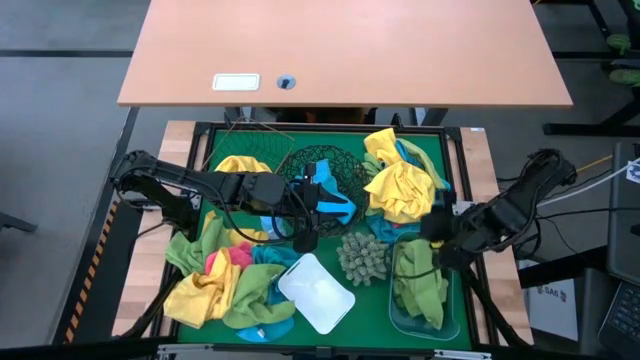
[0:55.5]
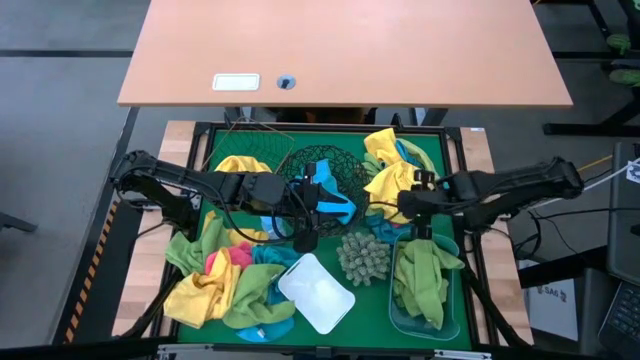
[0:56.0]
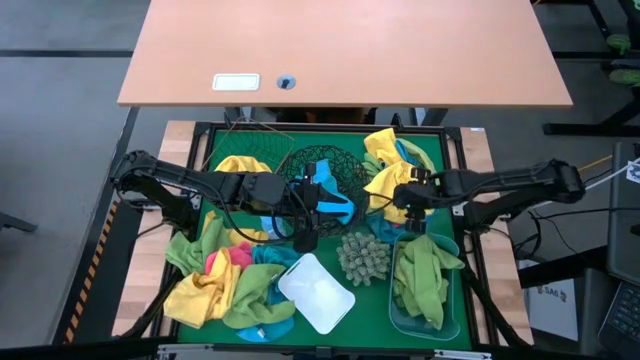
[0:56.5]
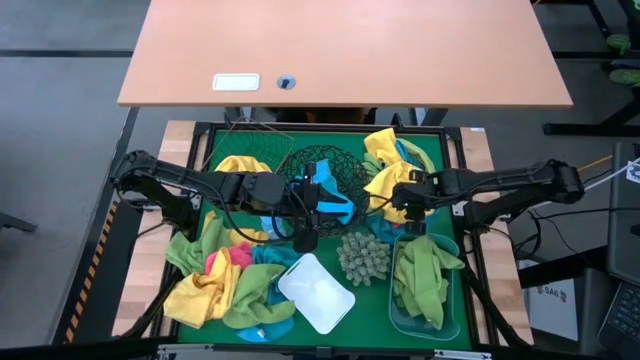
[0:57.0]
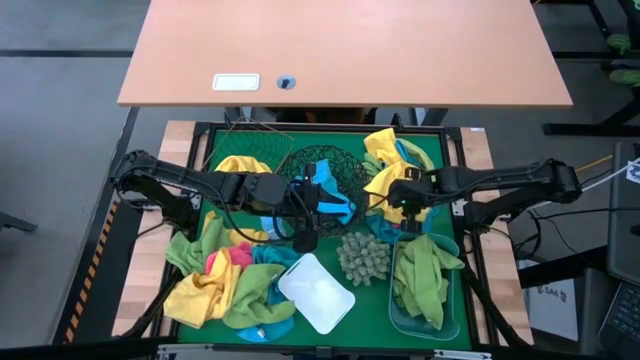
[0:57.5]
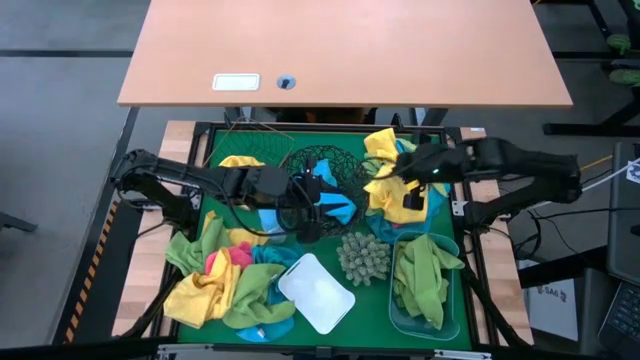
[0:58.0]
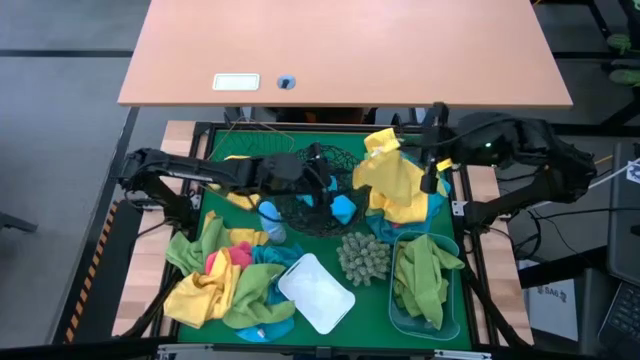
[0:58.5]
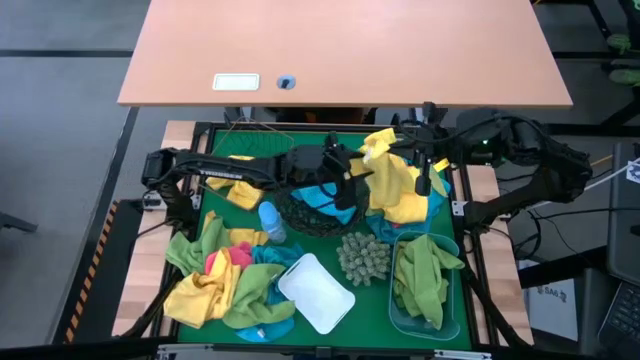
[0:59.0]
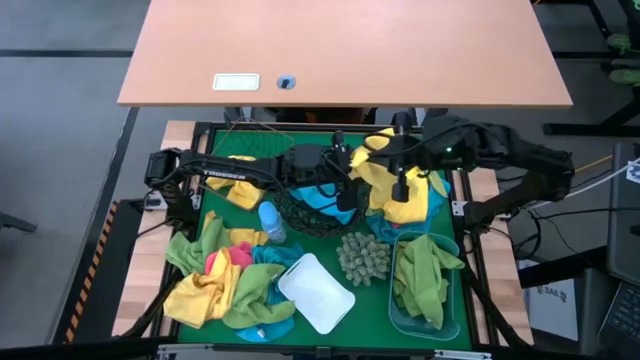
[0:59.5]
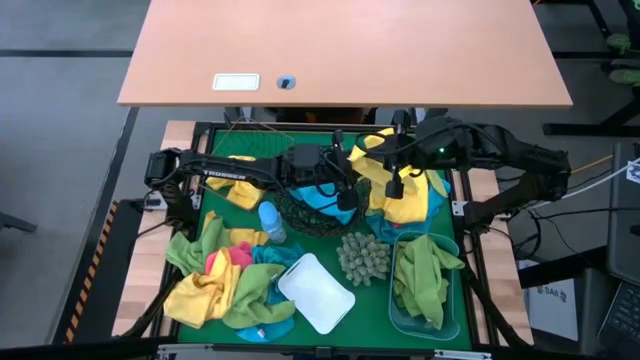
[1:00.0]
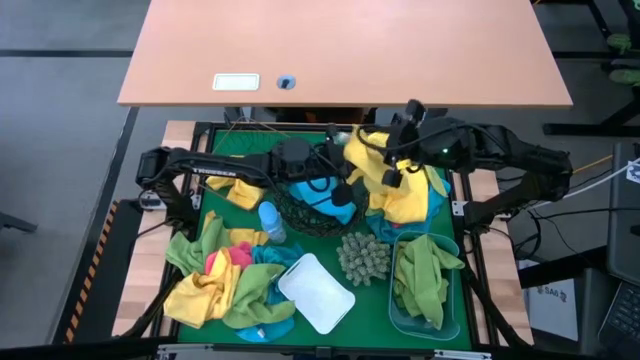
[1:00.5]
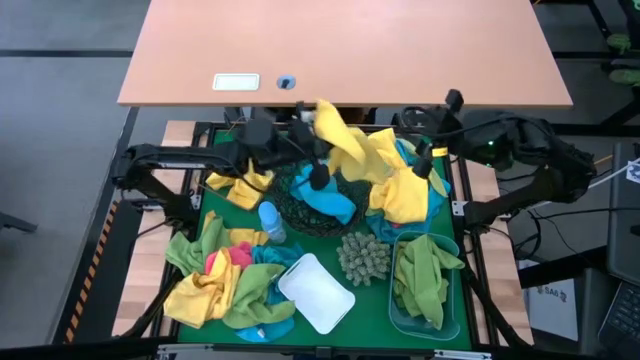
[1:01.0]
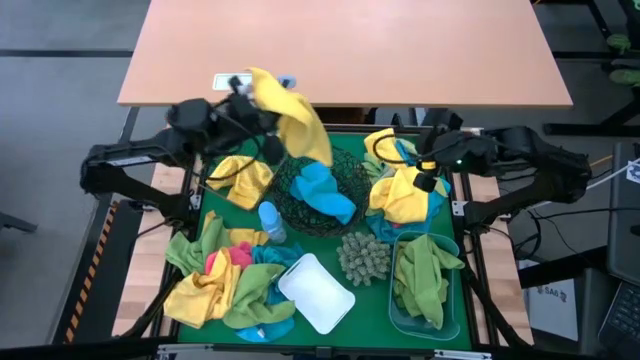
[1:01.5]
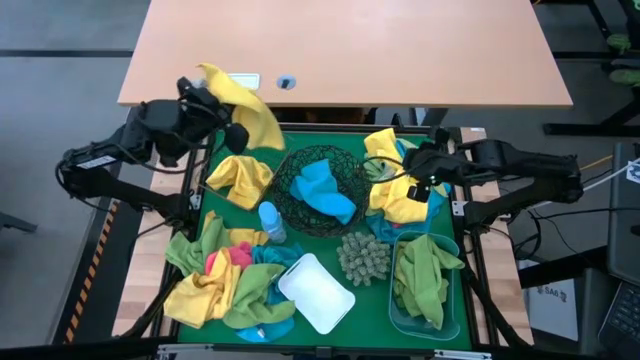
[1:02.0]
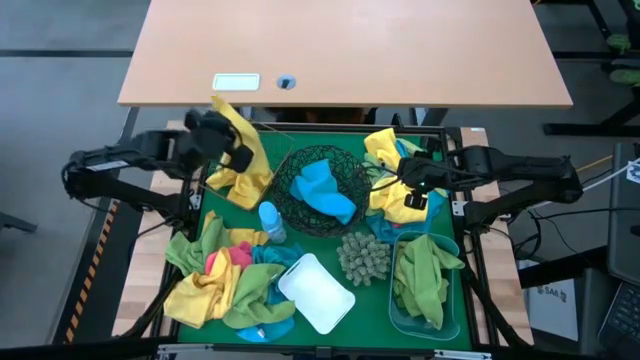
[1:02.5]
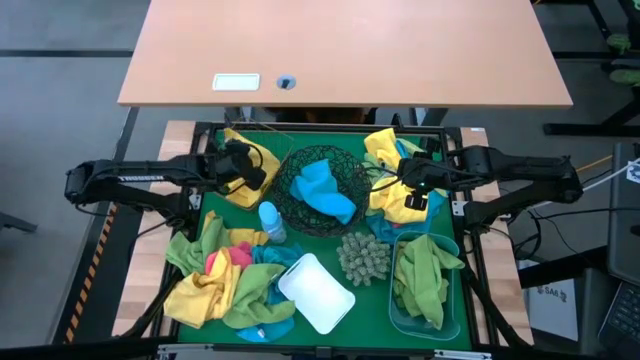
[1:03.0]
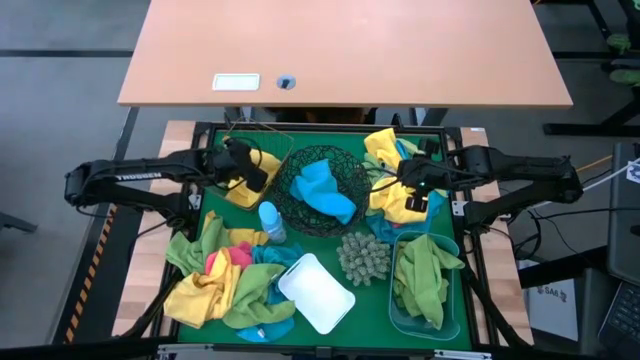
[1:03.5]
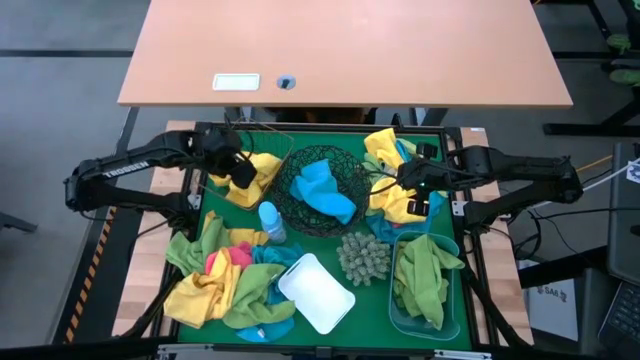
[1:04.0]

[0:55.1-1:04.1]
Task: Sort microfiber towel by color & place in baskets
Put the yellow microfiber cloth into the rectangular wire basket

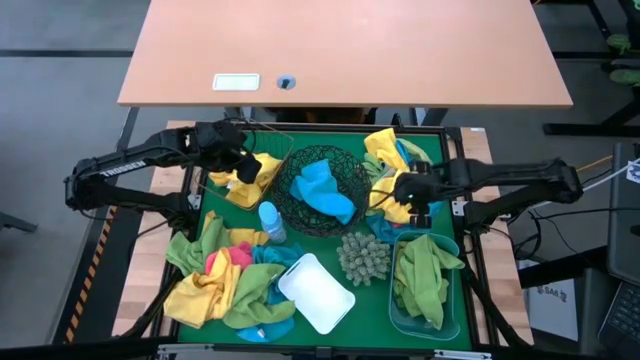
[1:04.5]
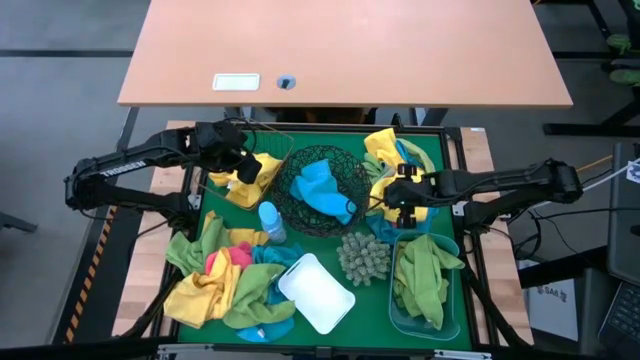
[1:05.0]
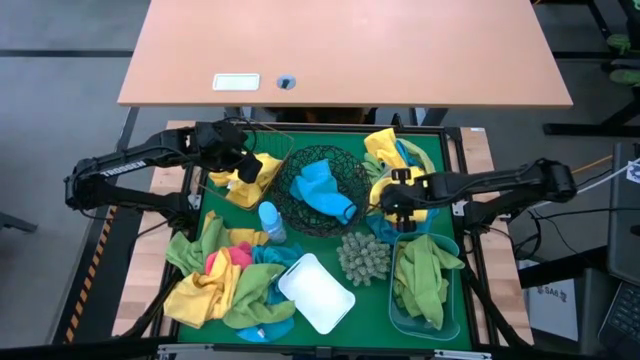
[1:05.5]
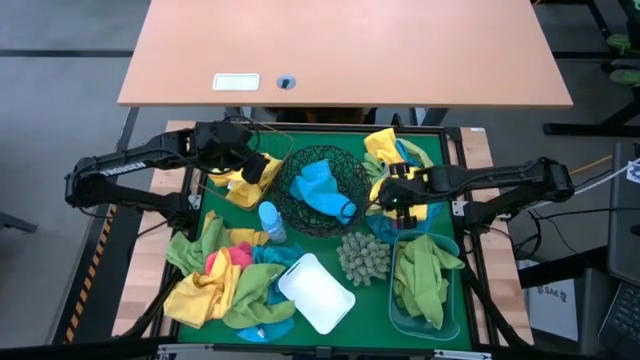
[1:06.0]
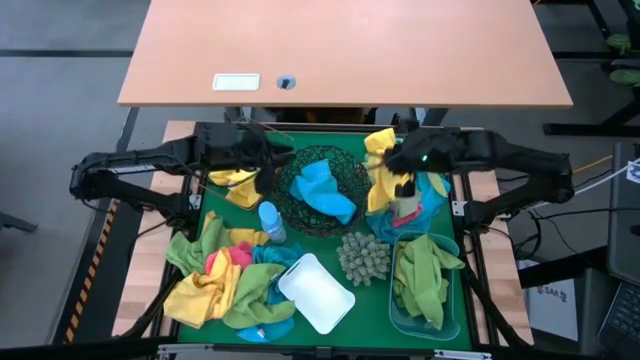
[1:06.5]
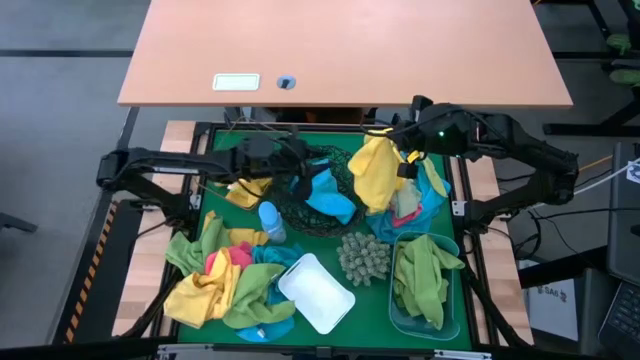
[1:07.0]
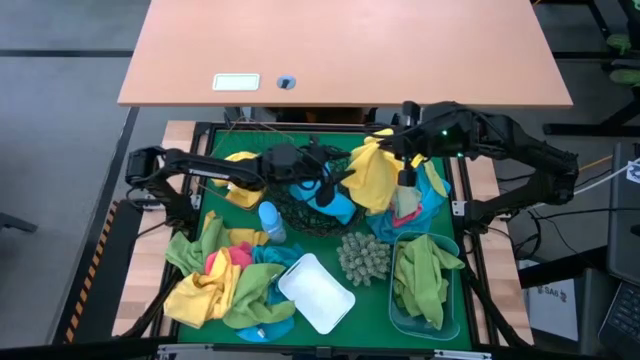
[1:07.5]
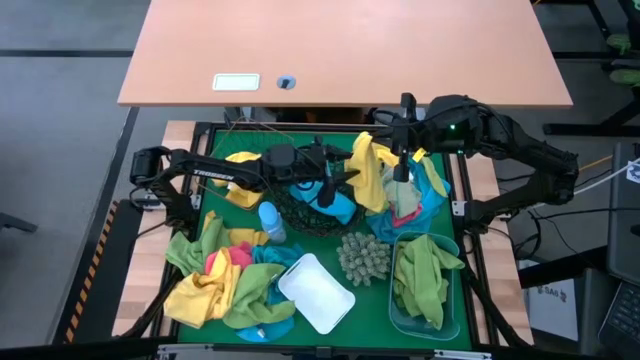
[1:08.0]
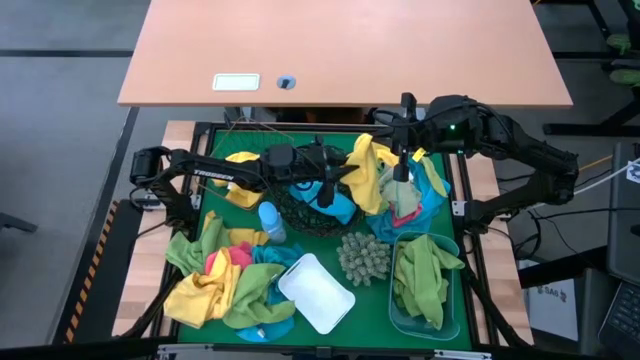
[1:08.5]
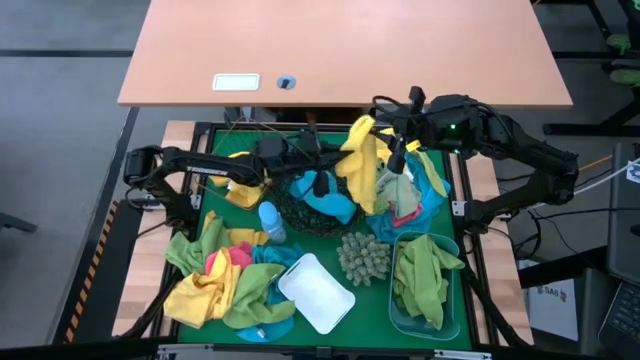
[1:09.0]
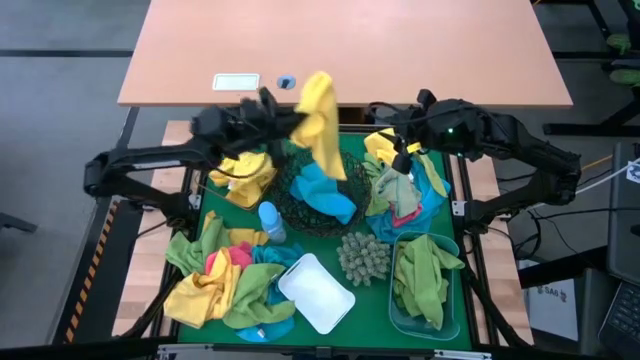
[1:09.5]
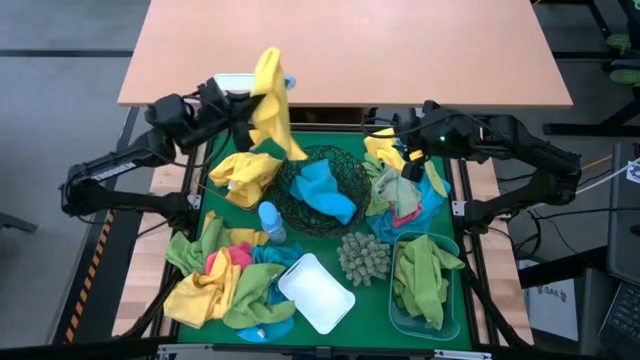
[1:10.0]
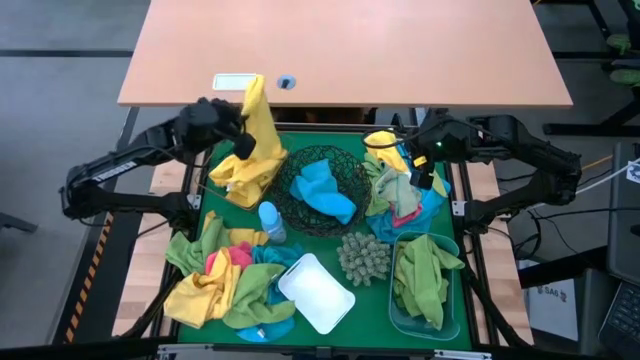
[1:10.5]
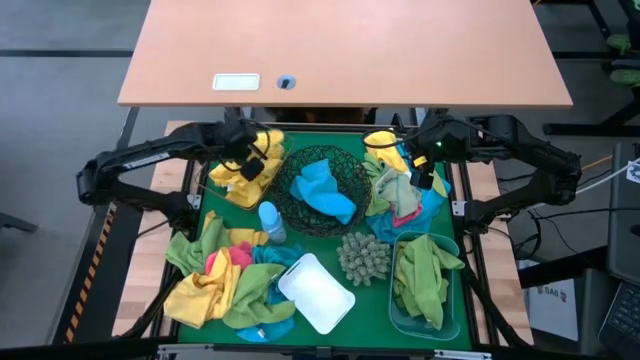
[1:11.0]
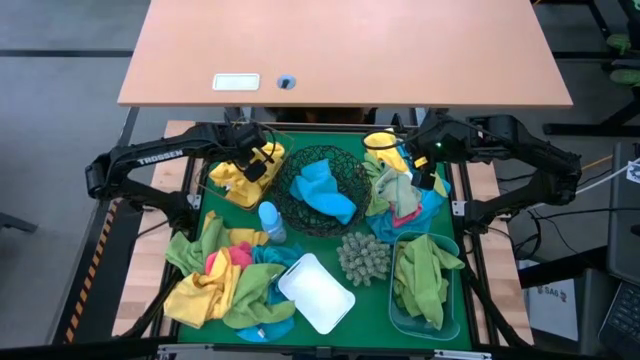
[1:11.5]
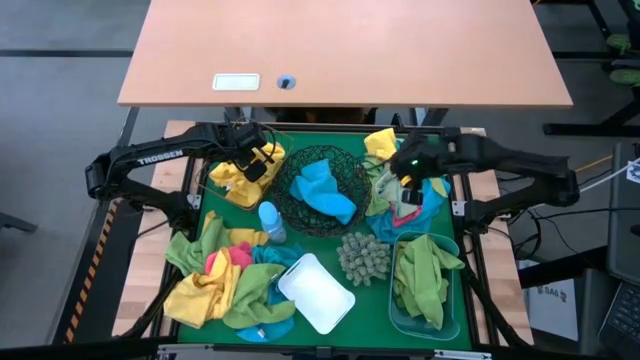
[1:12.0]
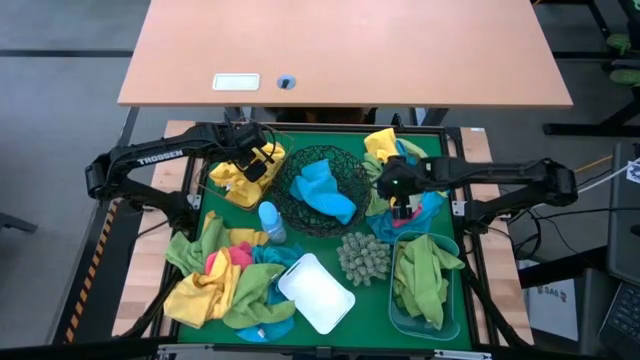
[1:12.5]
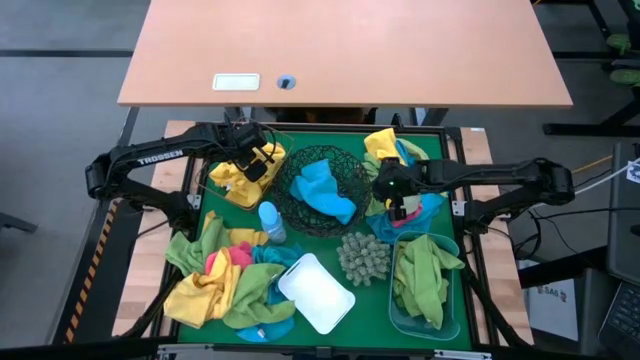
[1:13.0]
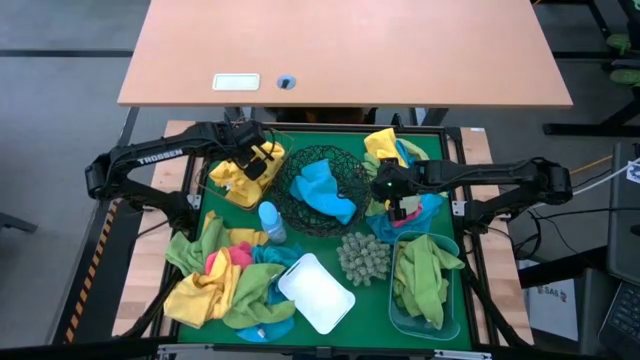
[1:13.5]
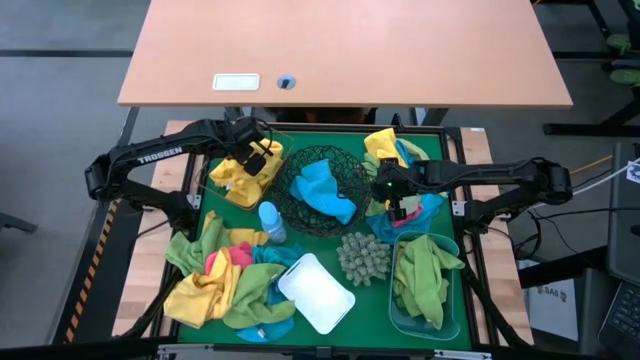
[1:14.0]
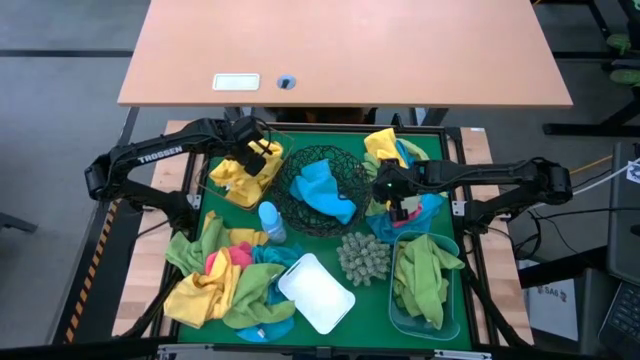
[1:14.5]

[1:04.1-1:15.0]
Put the yellow microfiber cloth into the rectangular wire basket

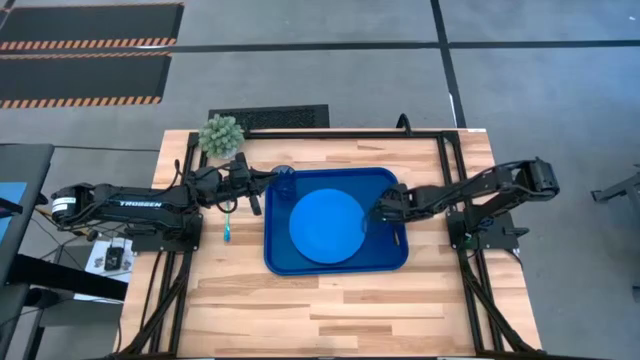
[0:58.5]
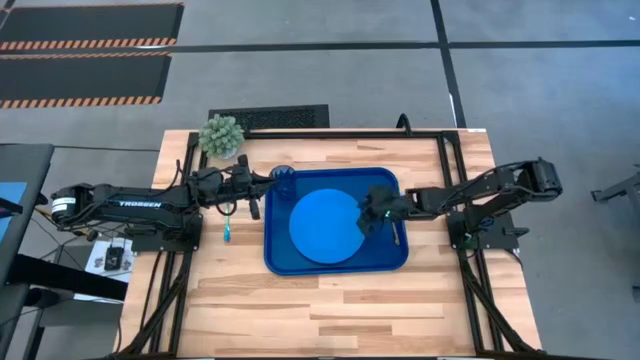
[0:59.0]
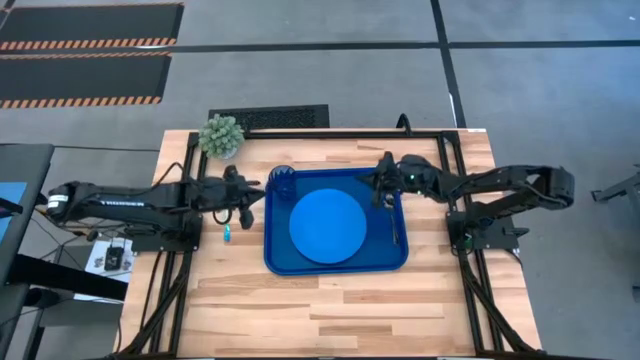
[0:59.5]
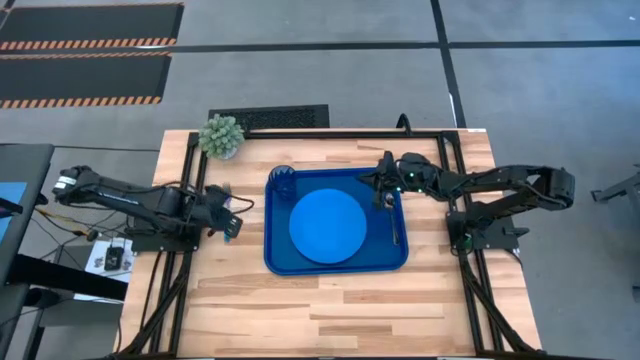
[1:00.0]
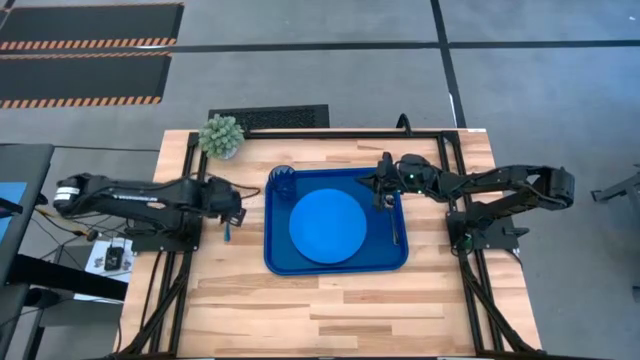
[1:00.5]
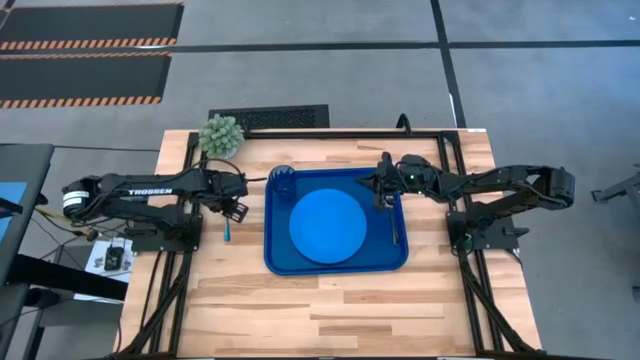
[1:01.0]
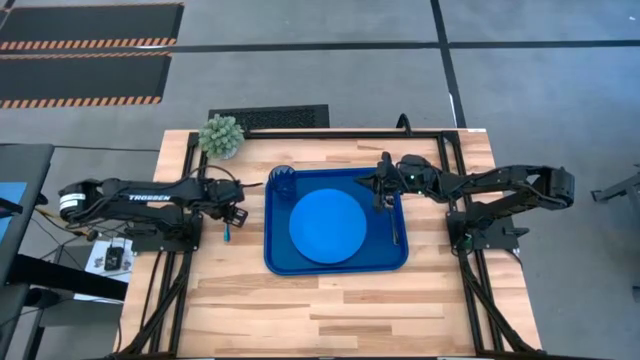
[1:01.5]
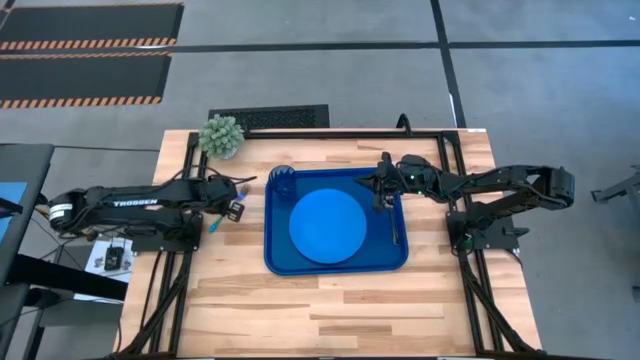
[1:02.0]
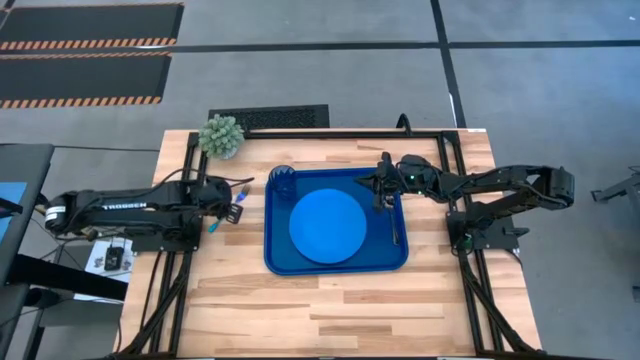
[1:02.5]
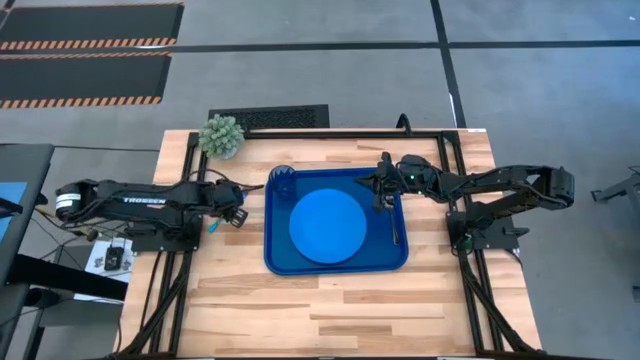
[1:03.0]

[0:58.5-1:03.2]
Task: Pick and place plate/cup/fork/spoon on tray
Put the blue fork on the blue tray to the left of the black spoon
